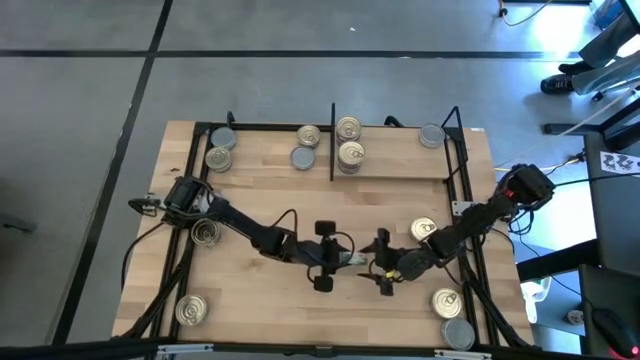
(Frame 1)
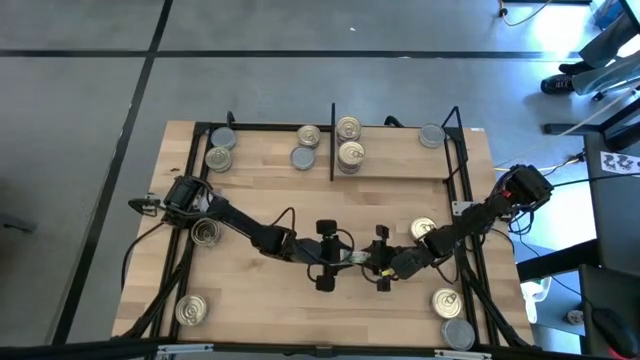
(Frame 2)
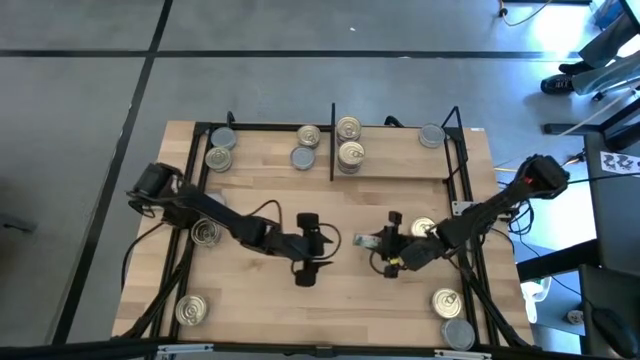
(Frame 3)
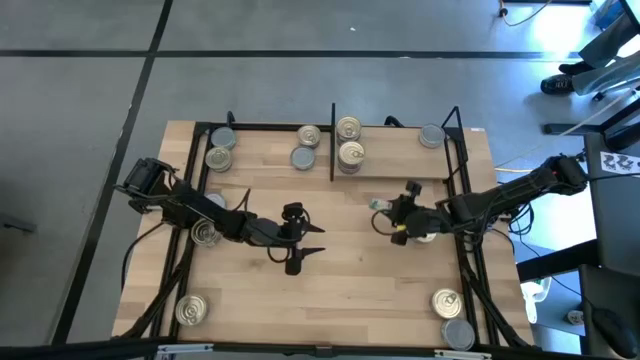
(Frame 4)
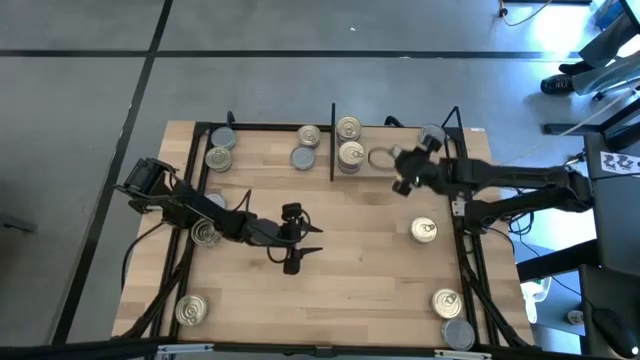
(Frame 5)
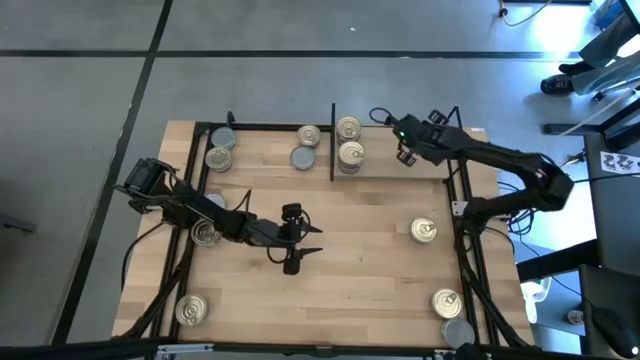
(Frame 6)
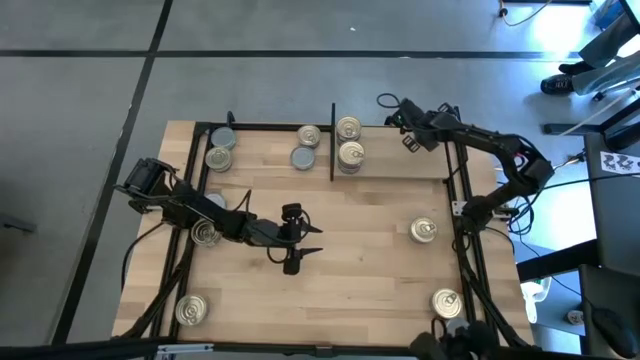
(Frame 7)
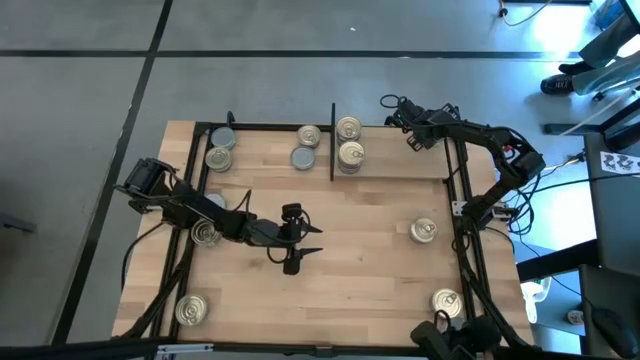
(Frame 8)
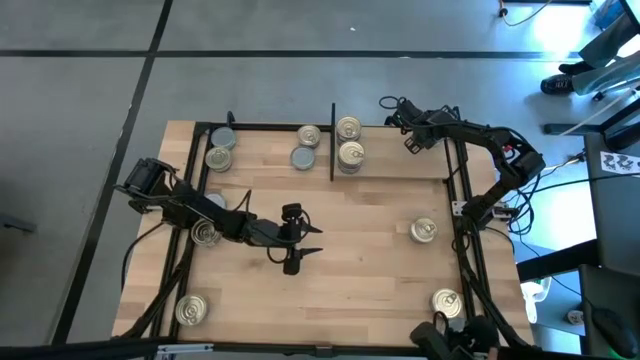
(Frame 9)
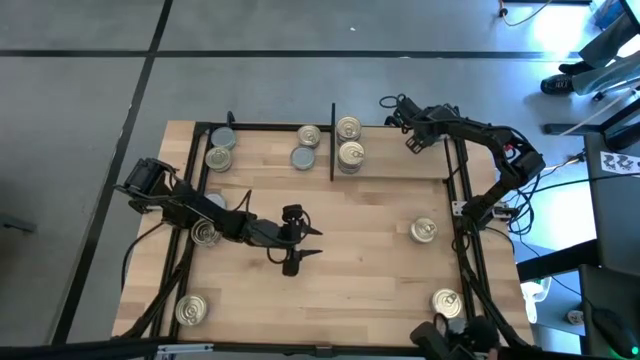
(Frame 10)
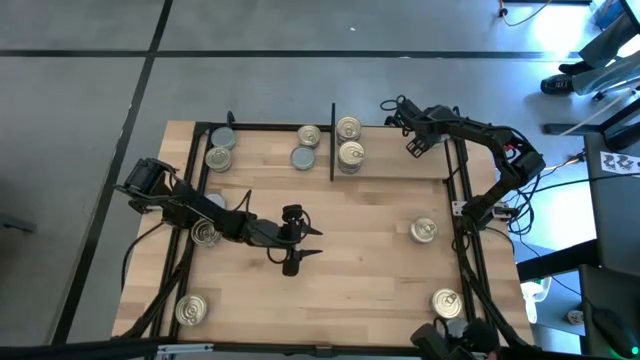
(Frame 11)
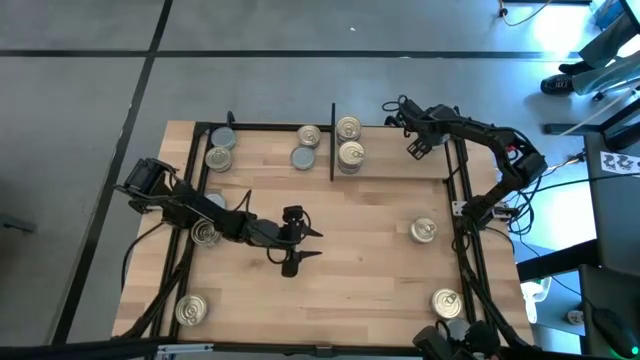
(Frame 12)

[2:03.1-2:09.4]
Task: Stack canned seafood by type on shelf
Stack the green tuna can on top of the green tuna can

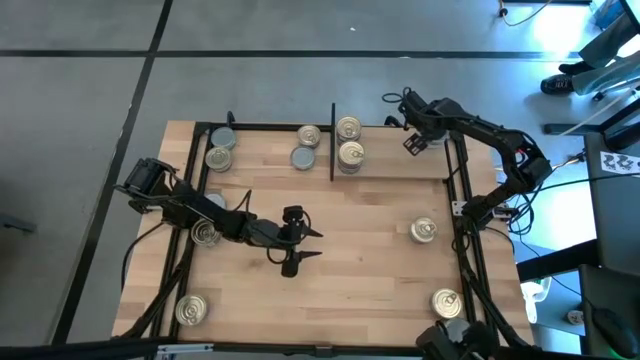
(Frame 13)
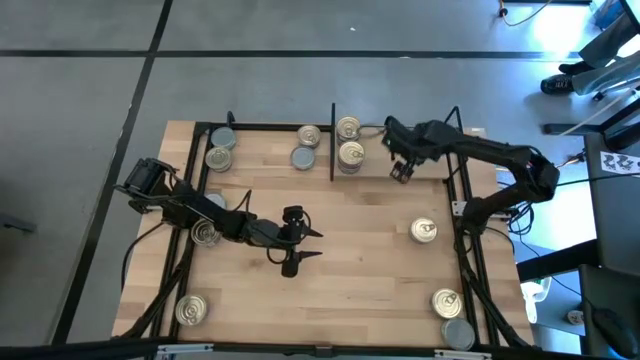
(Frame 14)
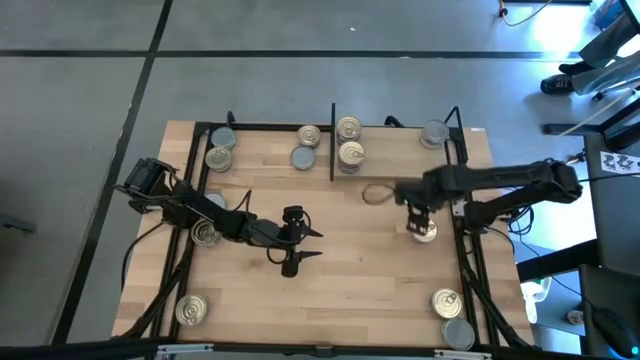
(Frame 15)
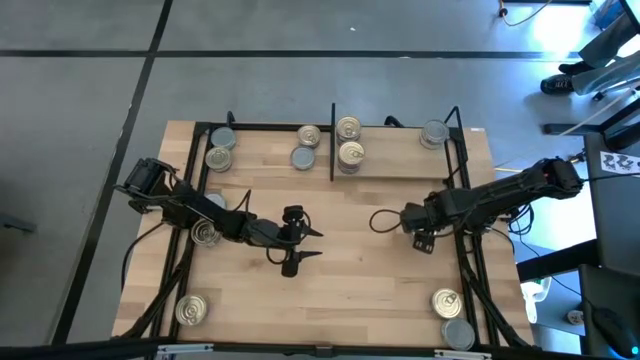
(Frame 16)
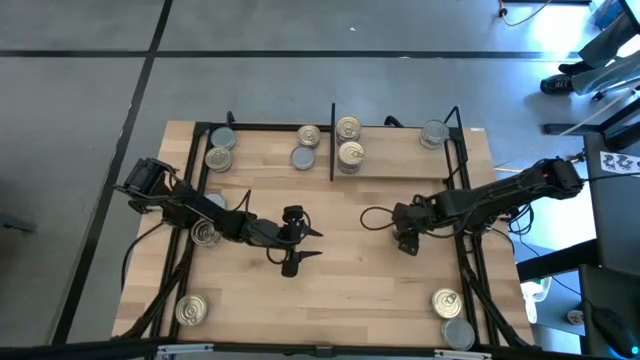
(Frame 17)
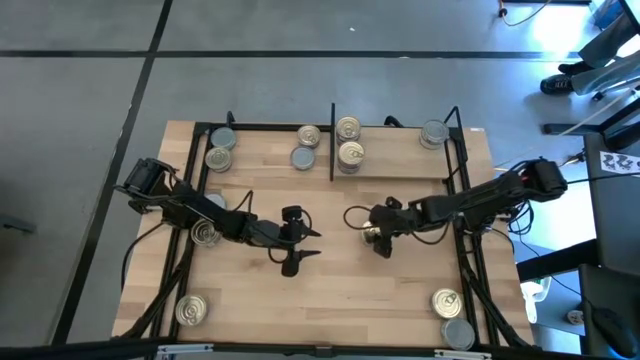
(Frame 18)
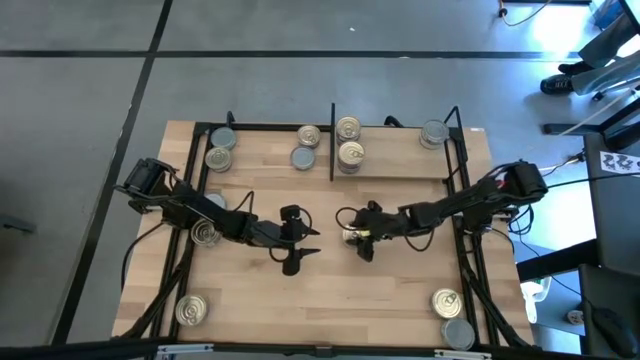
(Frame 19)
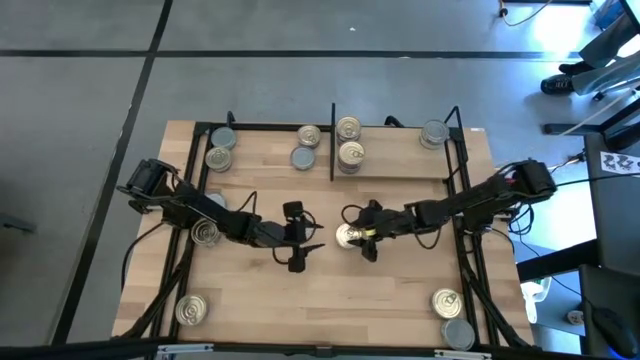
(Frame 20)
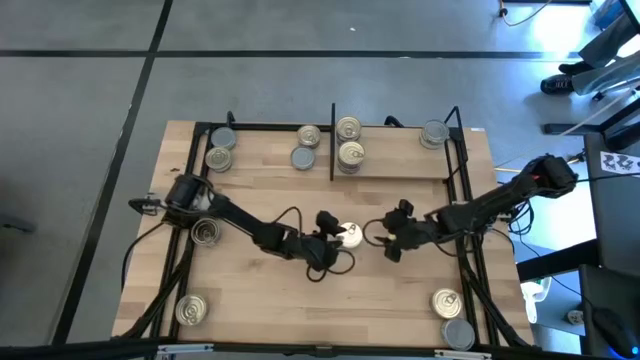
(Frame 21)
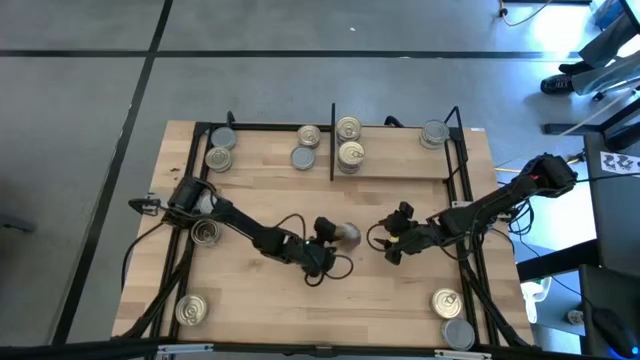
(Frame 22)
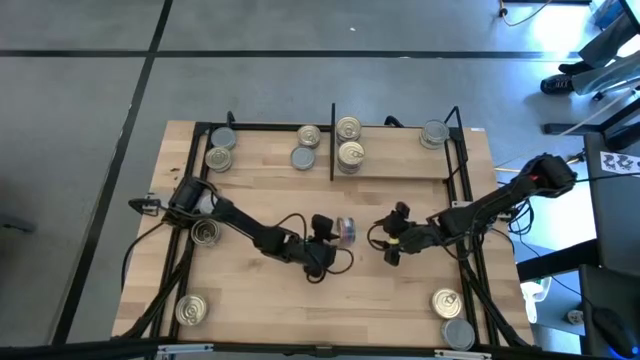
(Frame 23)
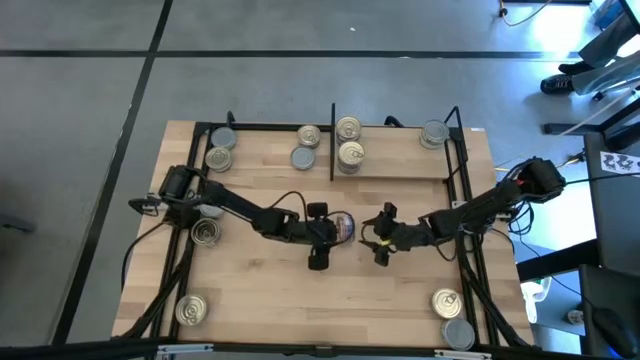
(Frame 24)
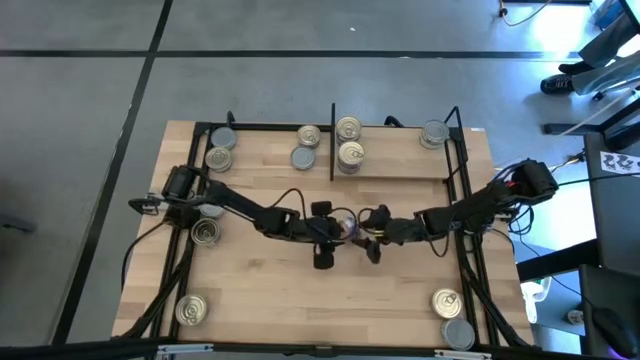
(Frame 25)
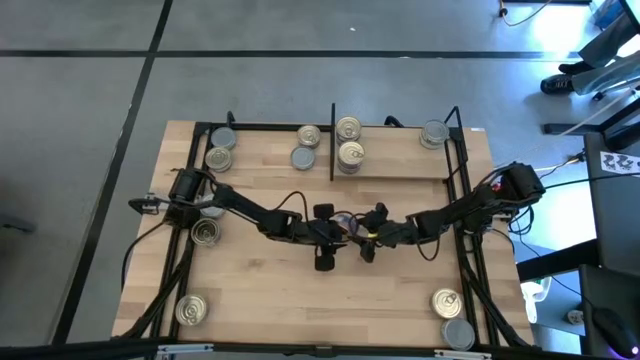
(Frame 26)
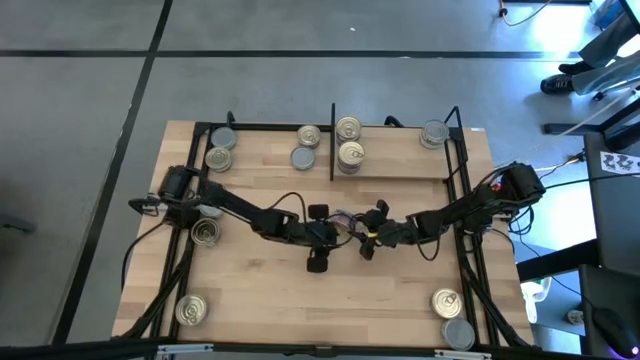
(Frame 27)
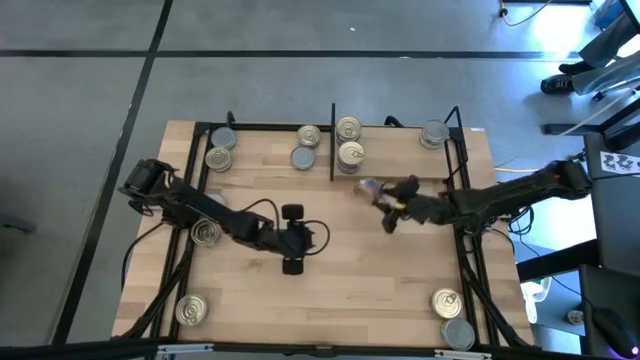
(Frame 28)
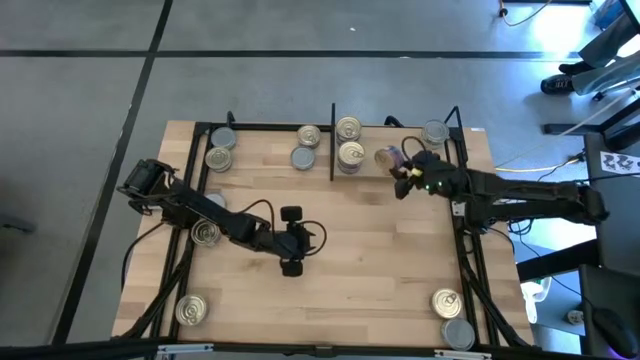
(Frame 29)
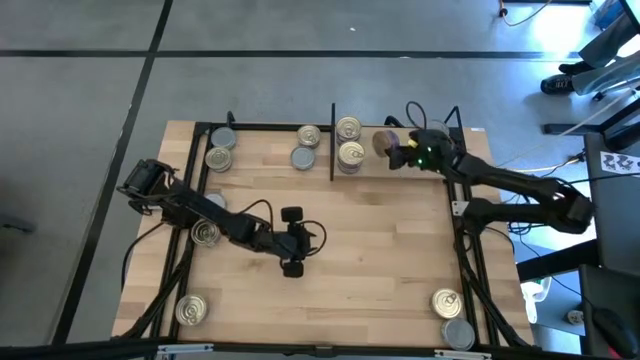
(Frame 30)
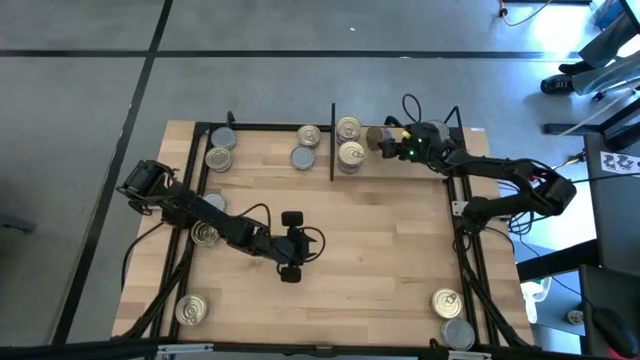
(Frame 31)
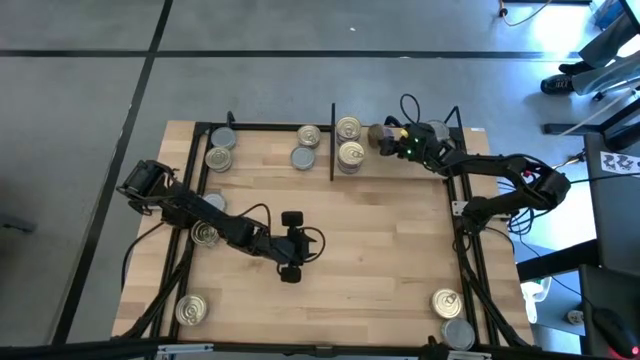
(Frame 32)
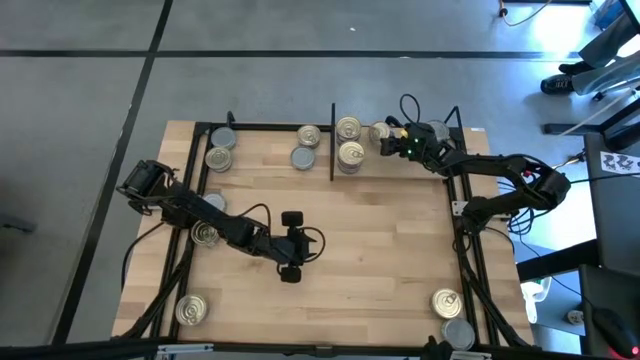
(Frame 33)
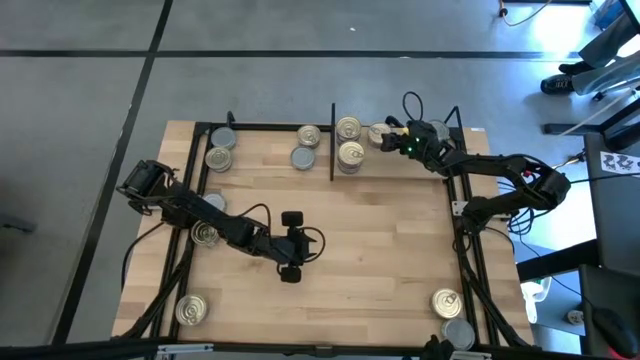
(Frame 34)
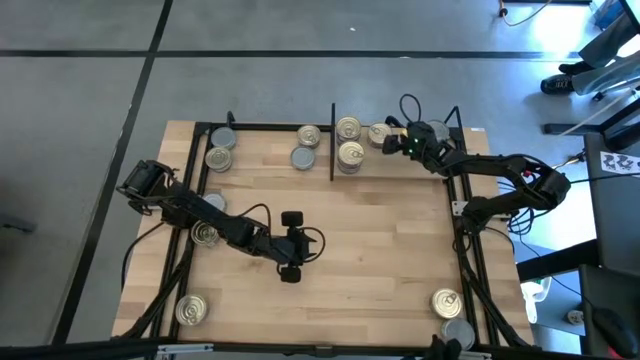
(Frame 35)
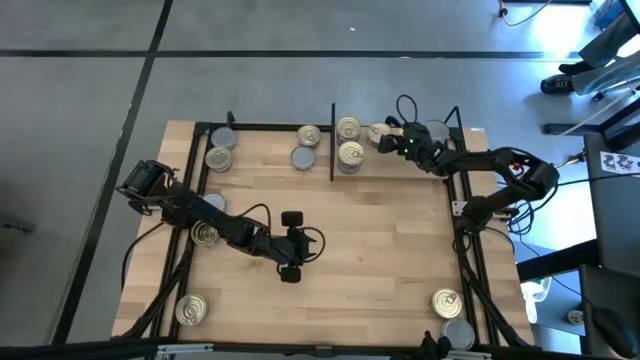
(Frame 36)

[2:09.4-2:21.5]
Put the blue tuna can on the shelf

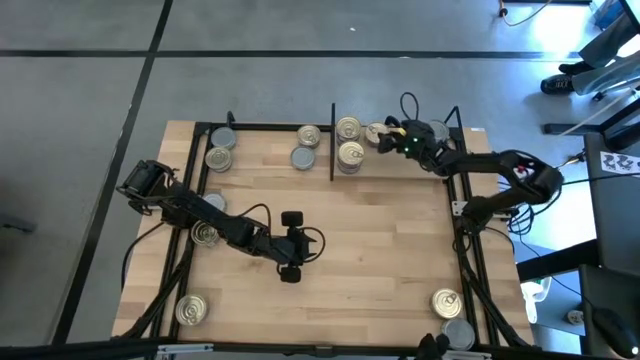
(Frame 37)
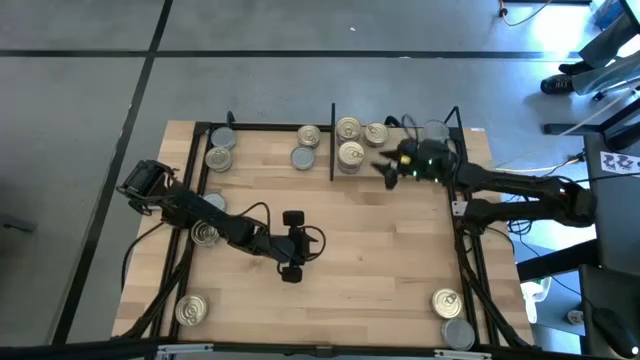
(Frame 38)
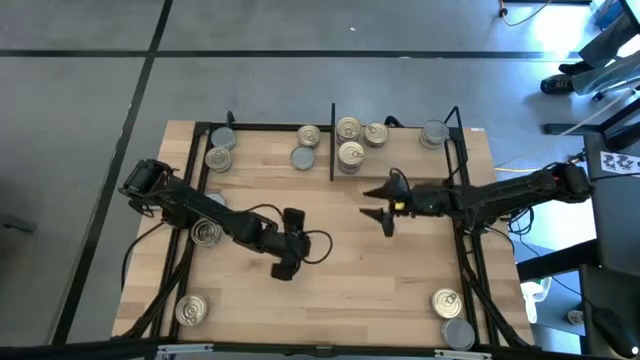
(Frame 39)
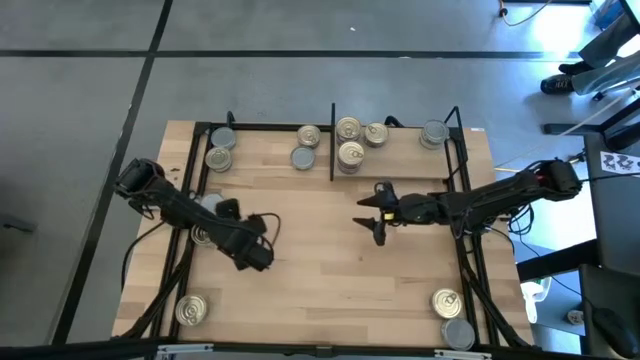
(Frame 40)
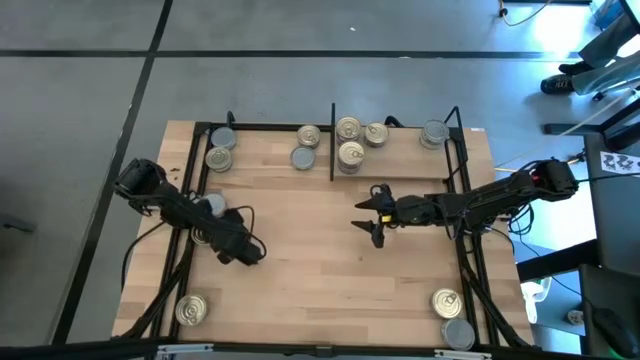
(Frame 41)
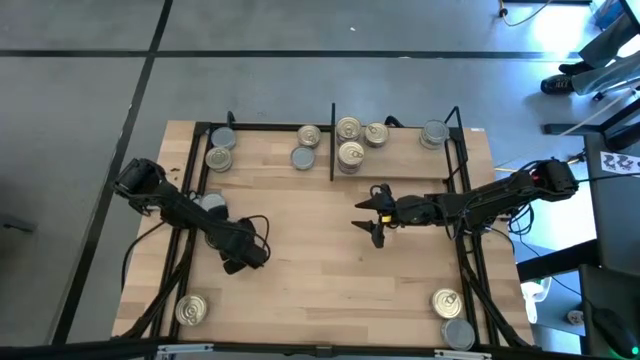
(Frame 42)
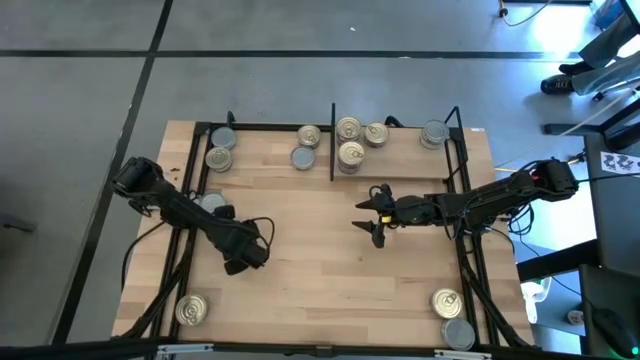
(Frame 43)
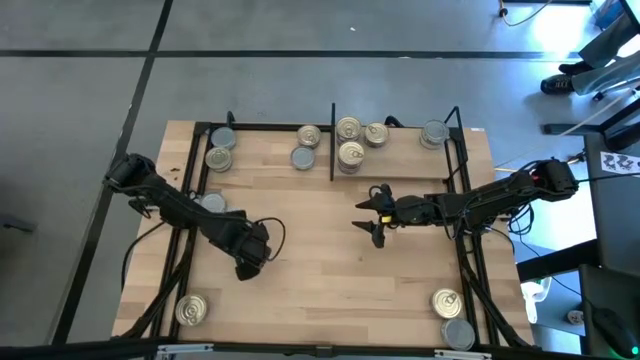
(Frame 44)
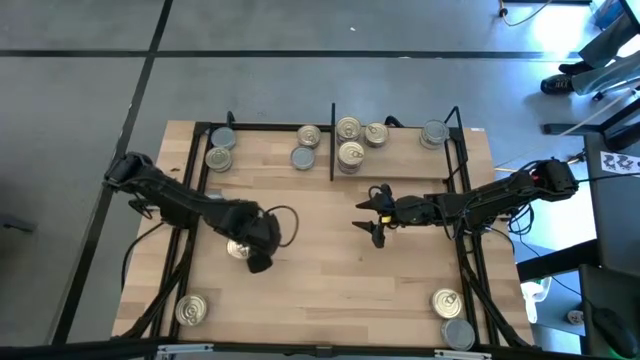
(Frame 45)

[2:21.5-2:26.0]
Stack the blue tuna can on top of the blue tuna can
